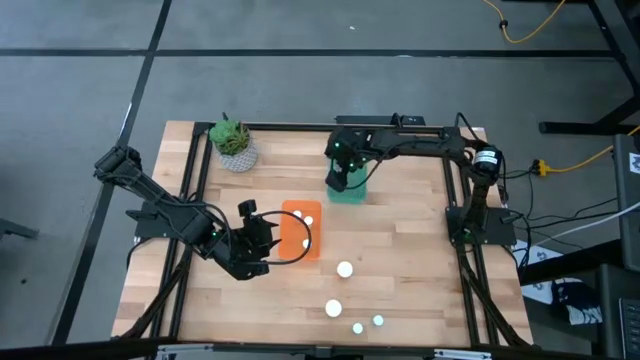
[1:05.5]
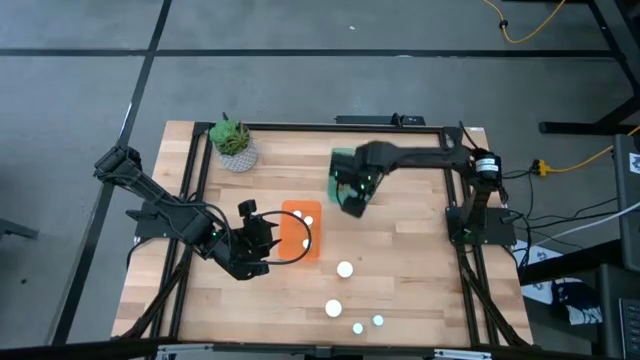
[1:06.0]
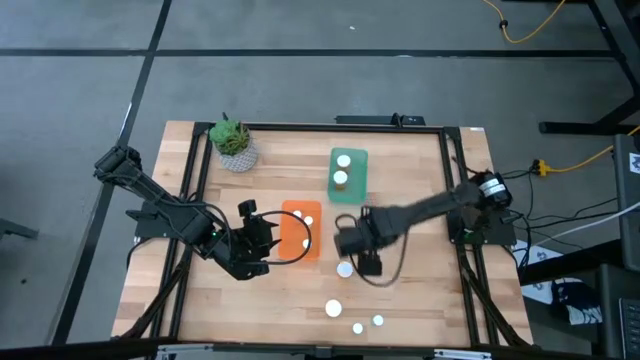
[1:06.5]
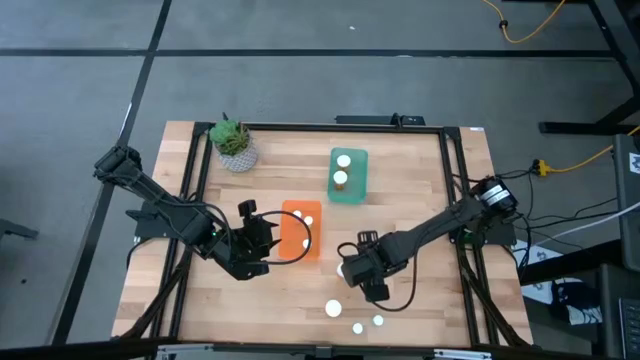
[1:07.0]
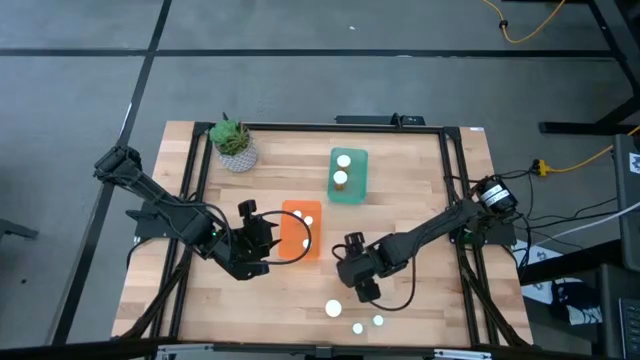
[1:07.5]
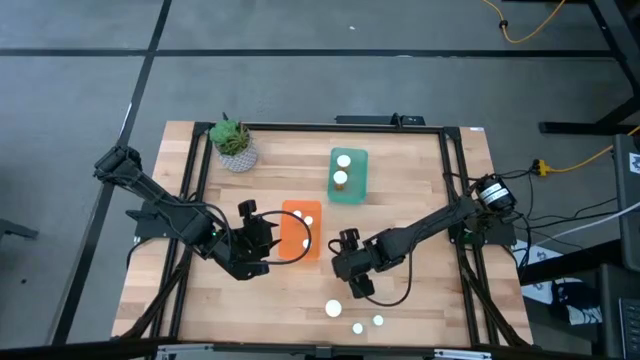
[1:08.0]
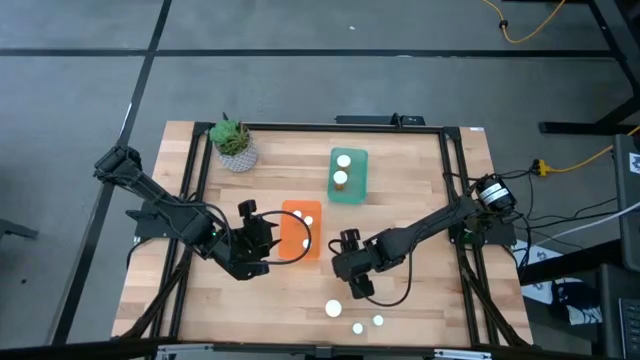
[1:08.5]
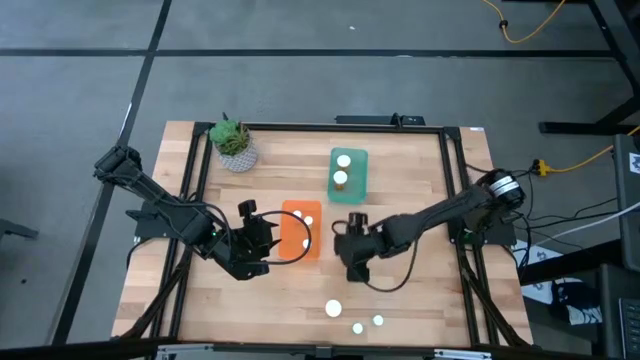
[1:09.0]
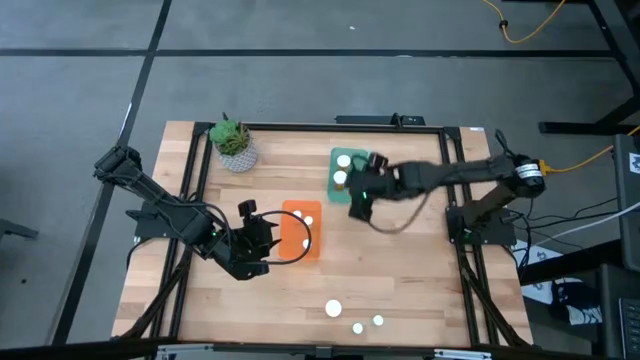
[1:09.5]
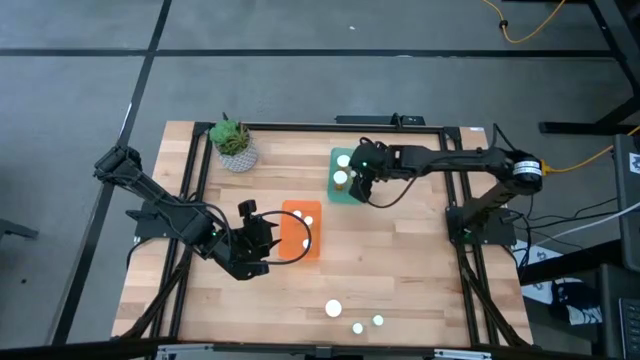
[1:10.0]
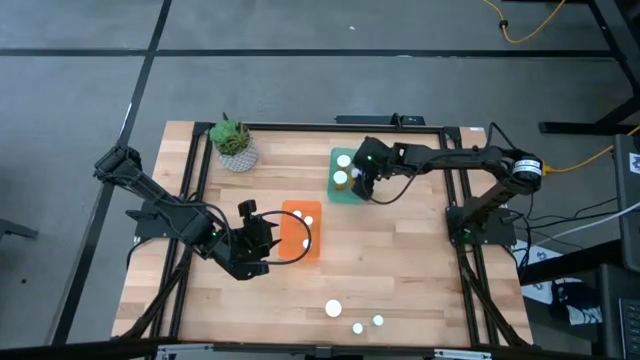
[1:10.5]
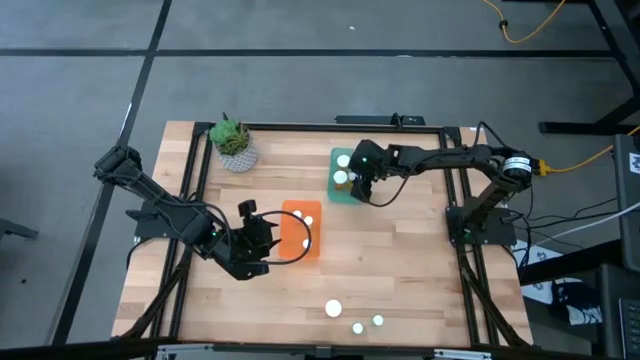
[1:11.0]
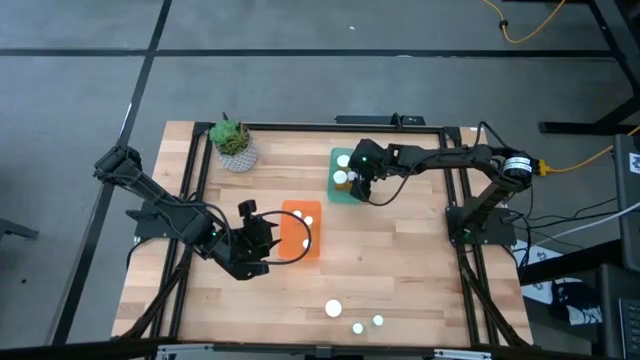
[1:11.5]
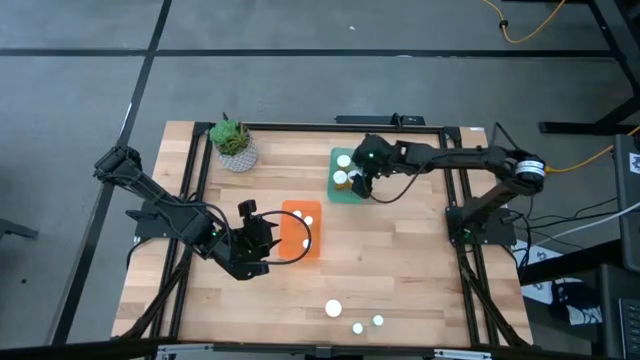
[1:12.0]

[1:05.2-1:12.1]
Task: Pick and place medicine bottles into bin by pill shape (circle, oval)
Put the large orange pill bottle into the blue bin

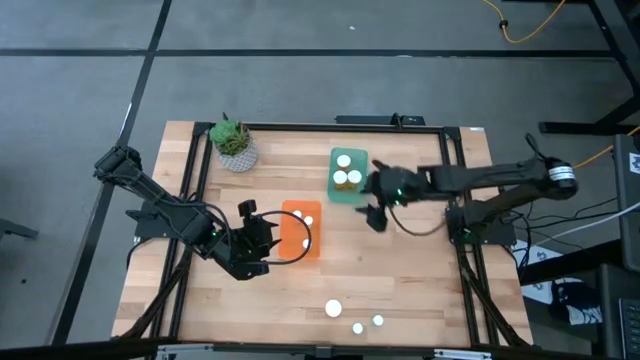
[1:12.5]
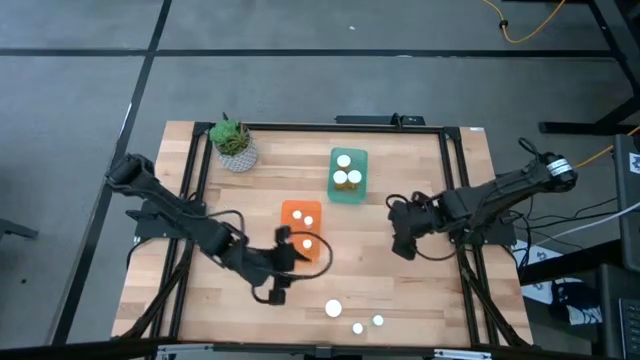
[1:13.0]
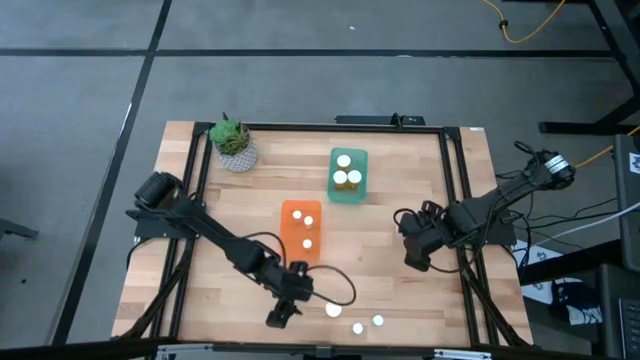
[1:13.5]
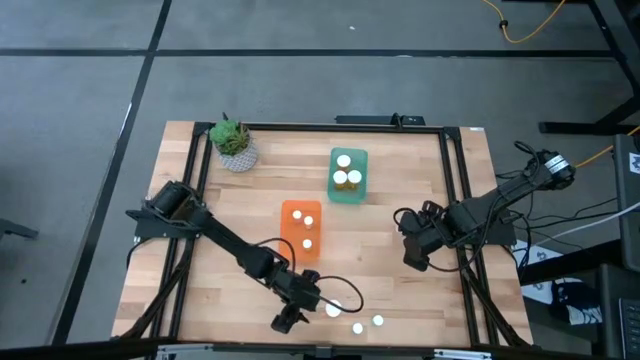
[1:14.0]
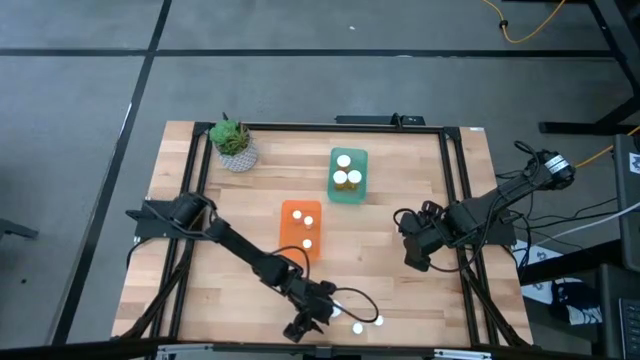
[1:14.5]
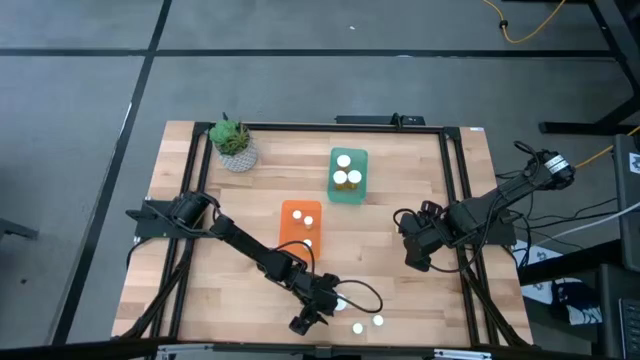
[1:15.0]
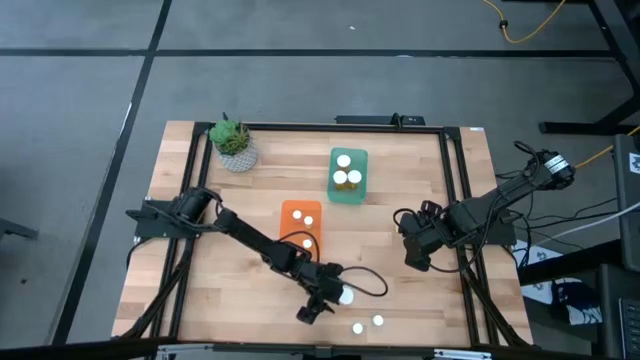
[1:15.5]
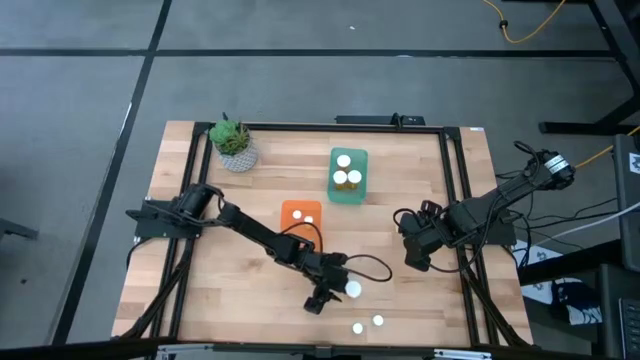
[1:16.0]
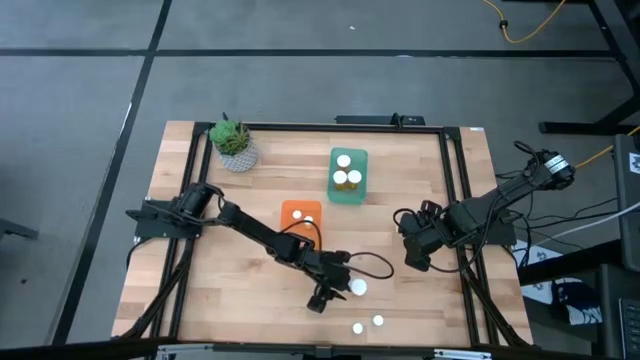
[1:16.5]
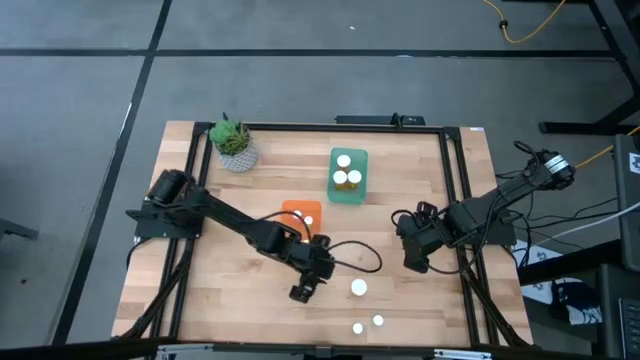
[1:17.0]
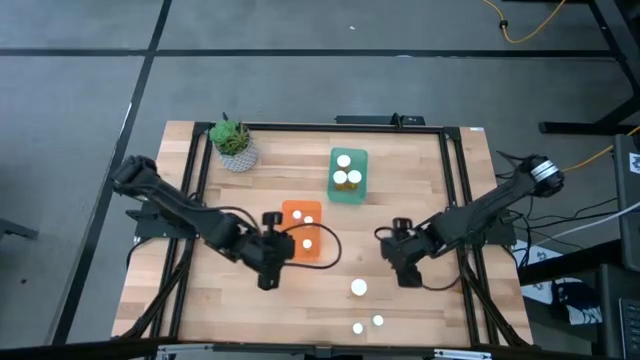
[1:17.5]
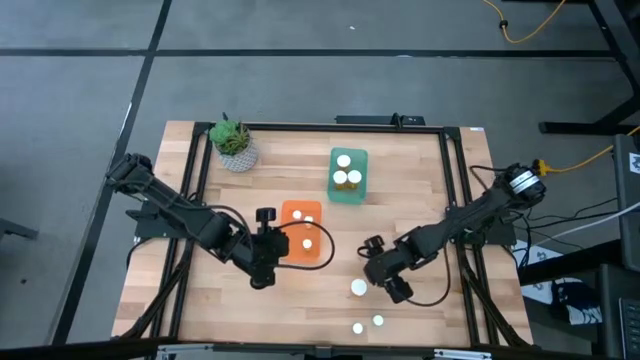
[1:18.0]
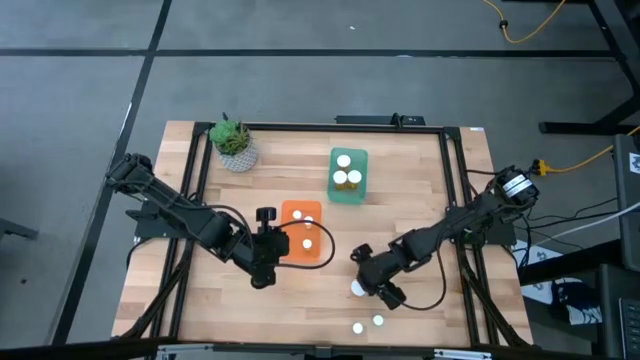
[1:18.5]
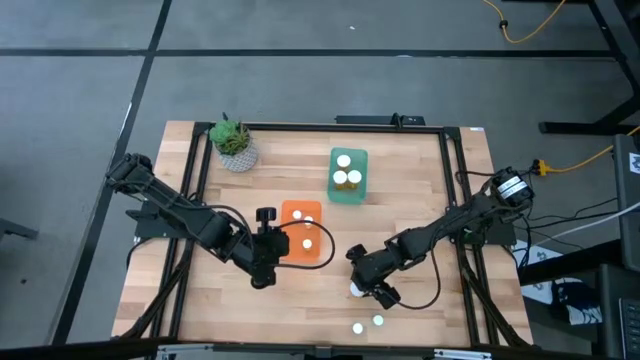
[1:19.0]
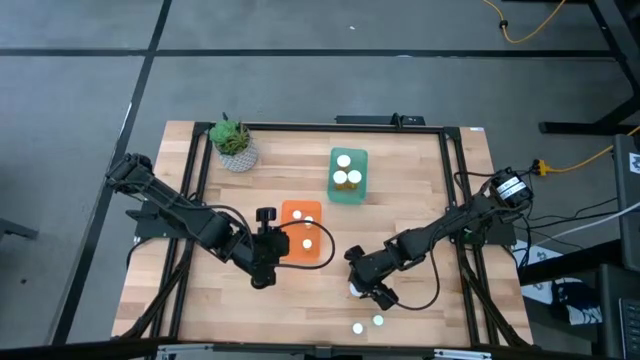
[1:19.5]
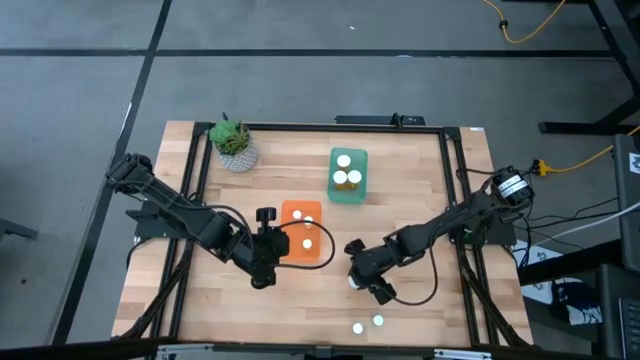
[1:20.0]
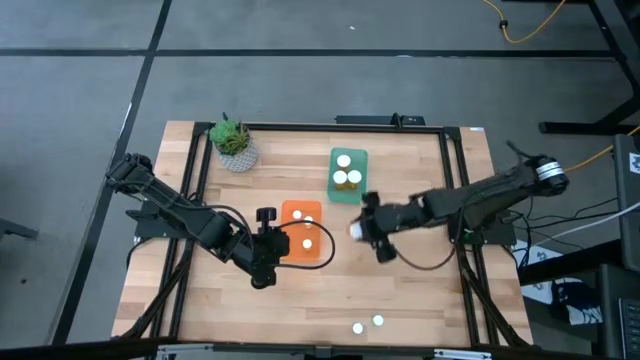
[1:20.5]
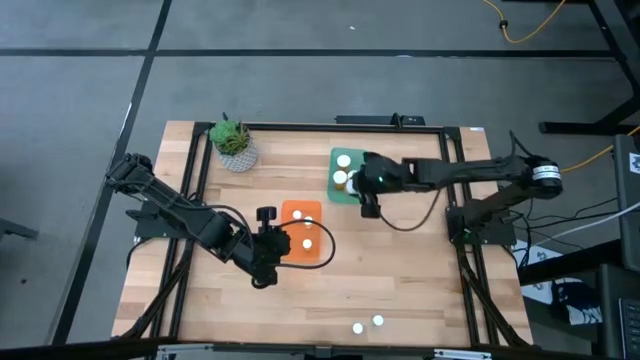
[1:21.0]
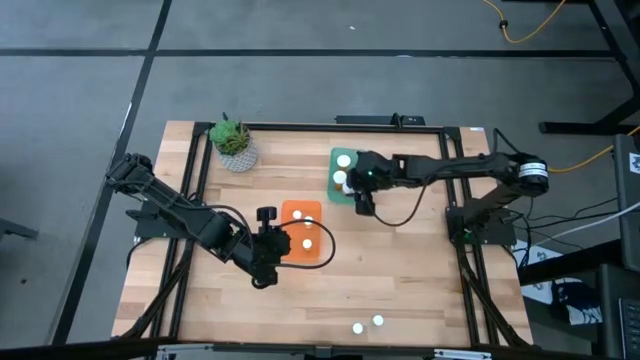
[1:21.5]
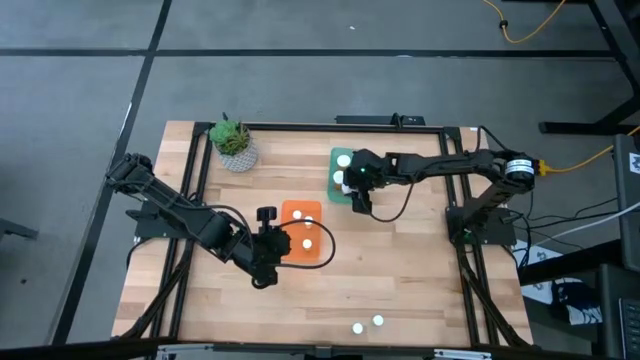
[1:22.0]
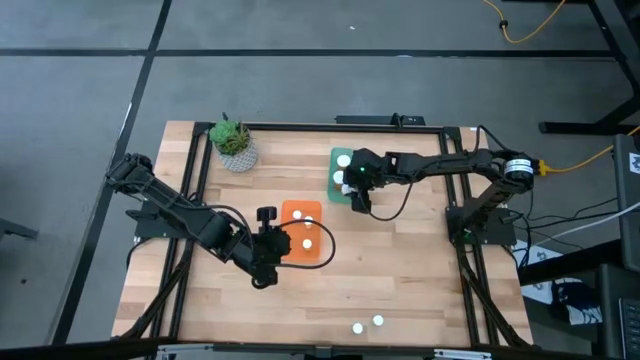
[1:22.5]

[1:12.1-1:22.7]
Put the large orange pill bottle into the blue bin

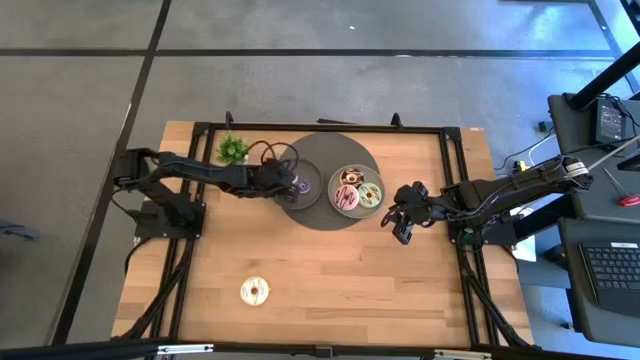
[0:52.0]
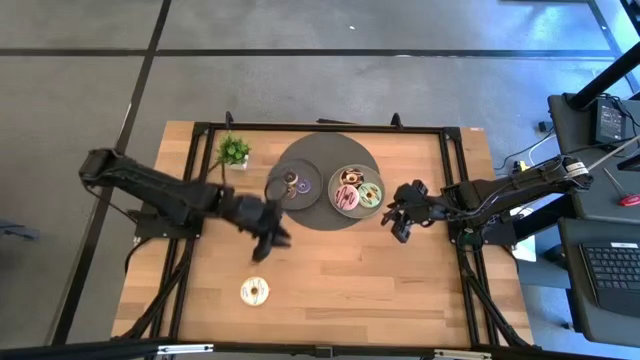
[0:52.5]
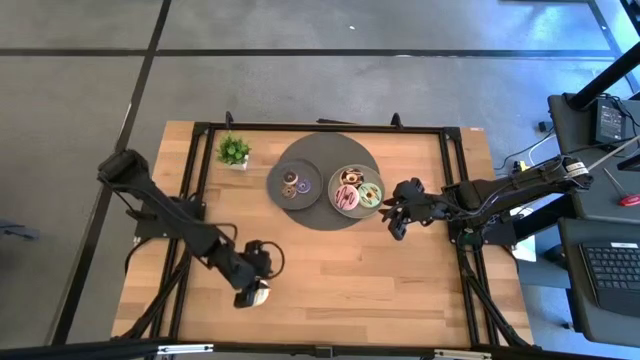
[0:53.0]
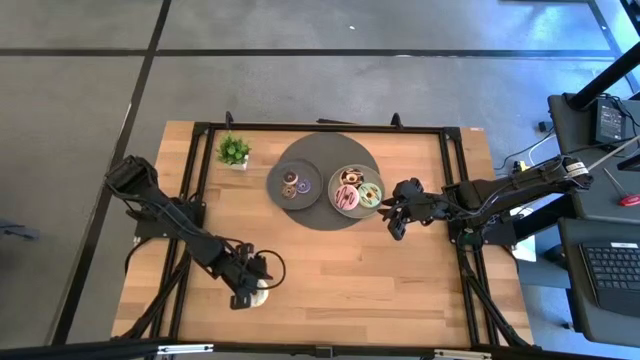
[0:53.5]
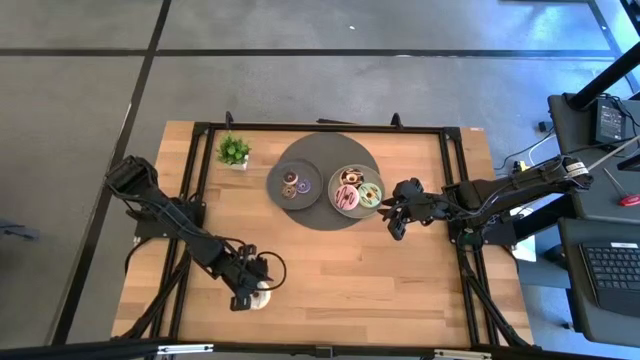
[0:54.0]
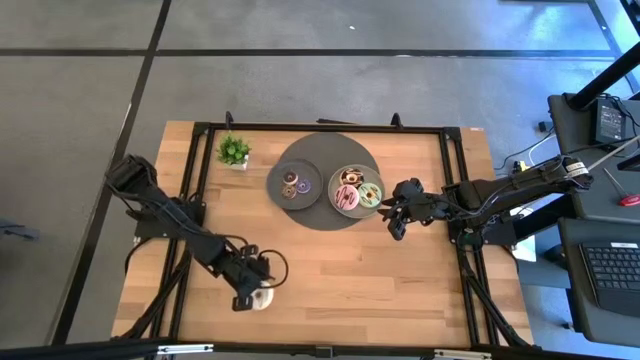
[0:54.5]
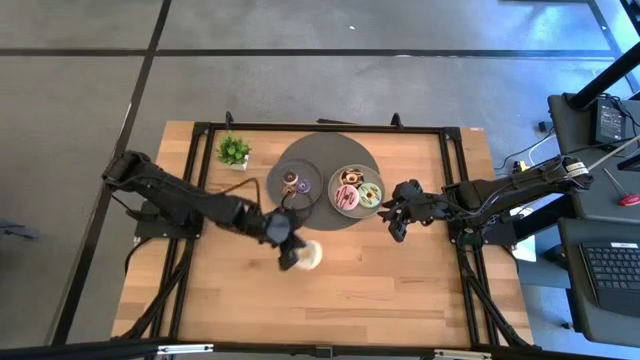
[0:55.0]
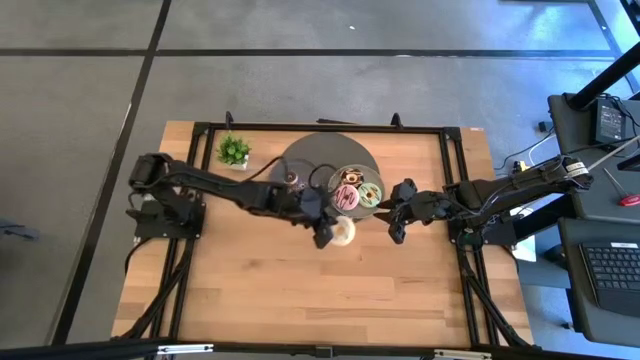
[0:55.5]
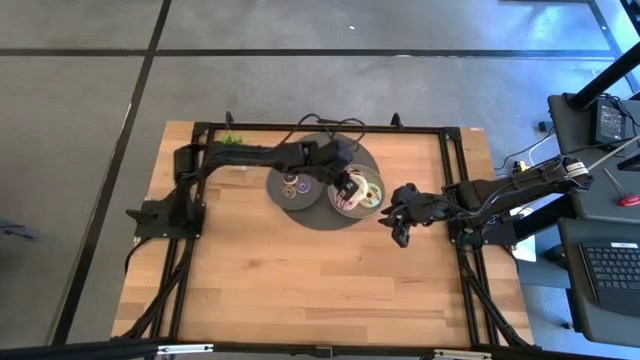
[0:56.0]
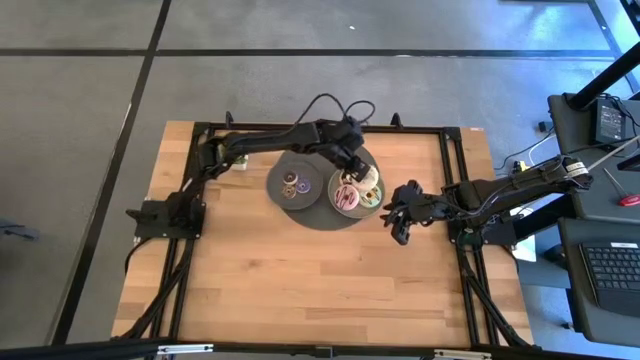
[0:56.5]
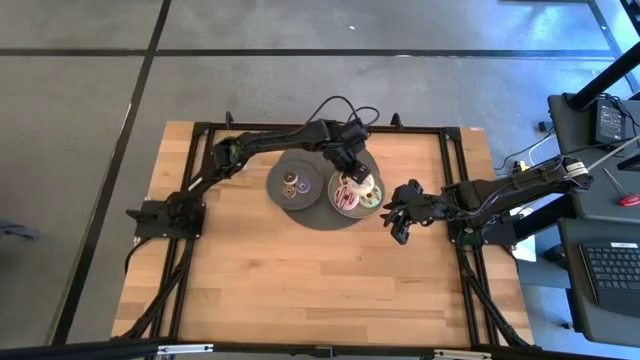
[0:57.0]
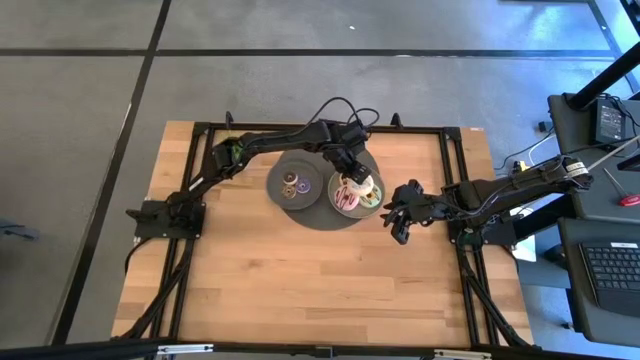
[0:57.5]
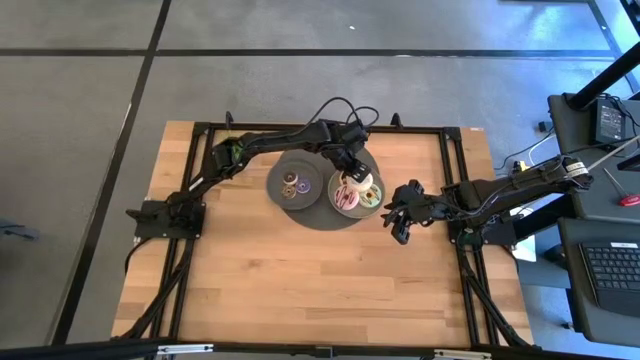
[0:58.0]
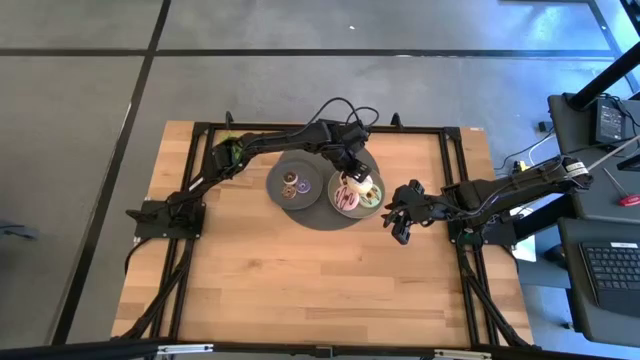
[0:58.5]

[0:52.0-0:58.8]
Task: Pick & Place donuts
Put the large white donut on the gray plate
